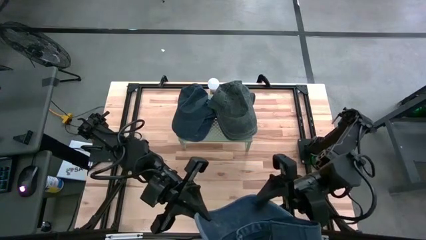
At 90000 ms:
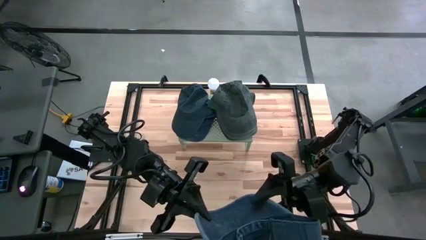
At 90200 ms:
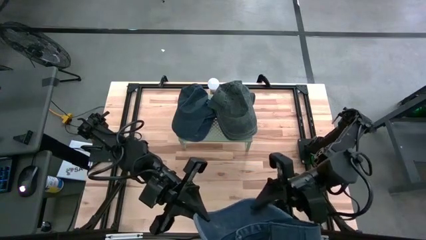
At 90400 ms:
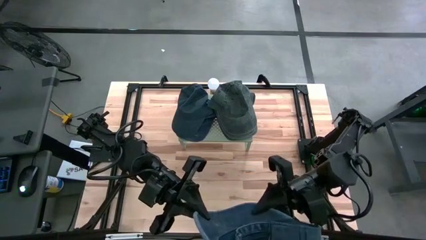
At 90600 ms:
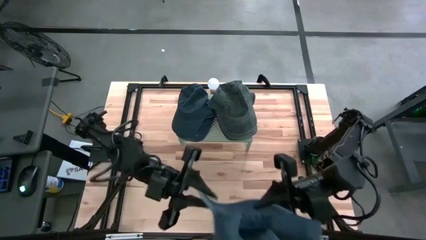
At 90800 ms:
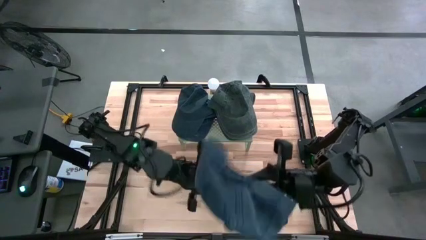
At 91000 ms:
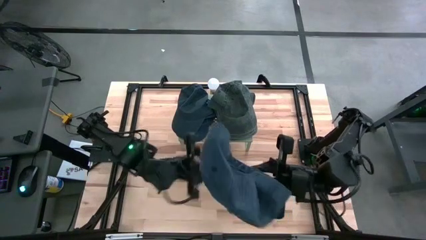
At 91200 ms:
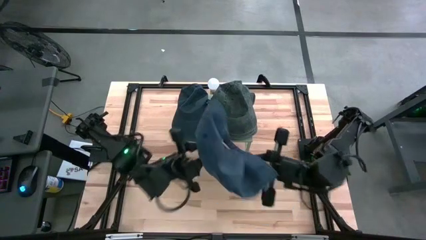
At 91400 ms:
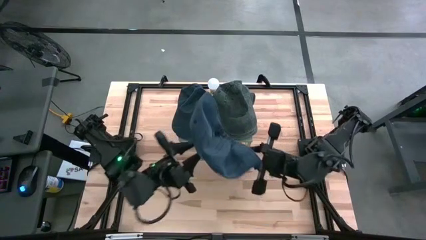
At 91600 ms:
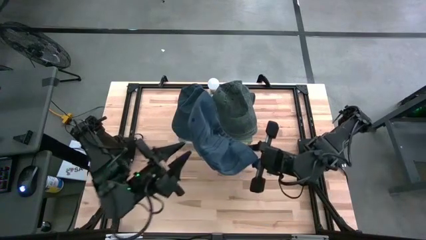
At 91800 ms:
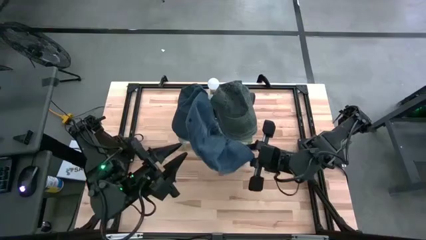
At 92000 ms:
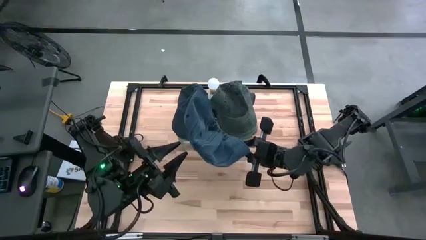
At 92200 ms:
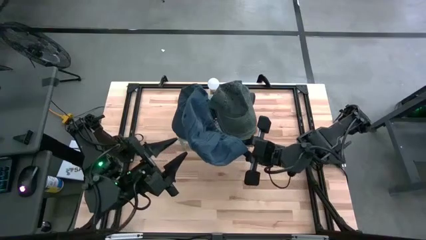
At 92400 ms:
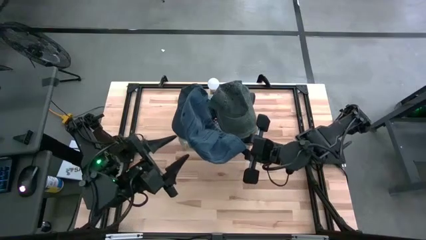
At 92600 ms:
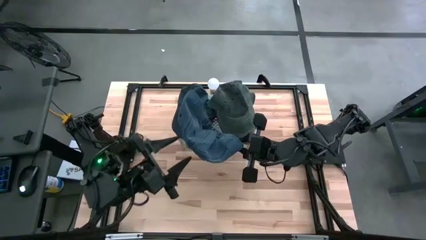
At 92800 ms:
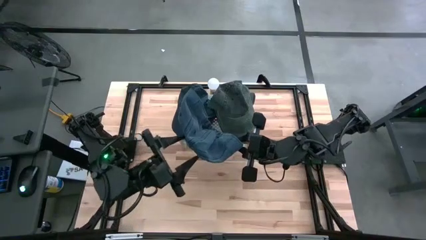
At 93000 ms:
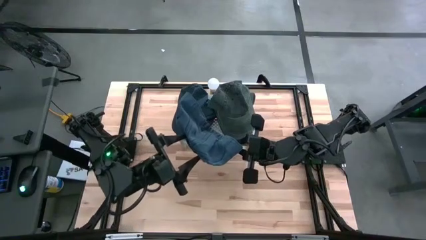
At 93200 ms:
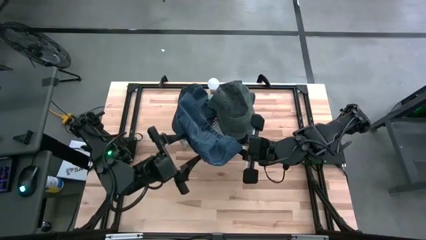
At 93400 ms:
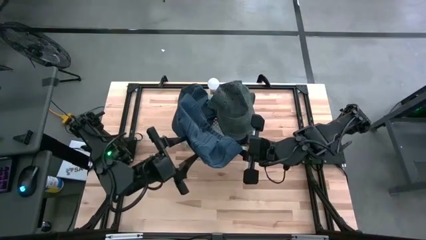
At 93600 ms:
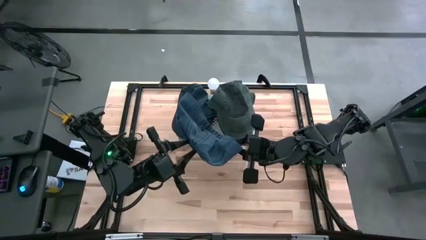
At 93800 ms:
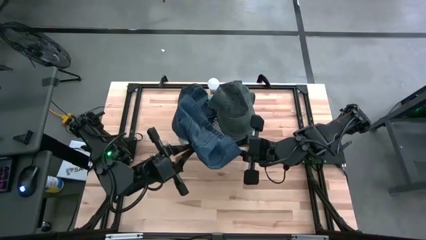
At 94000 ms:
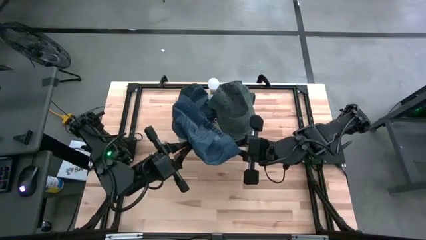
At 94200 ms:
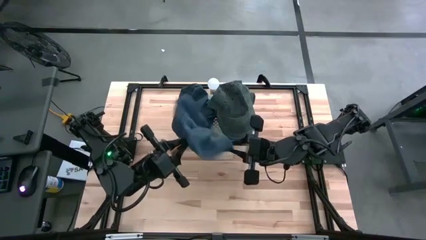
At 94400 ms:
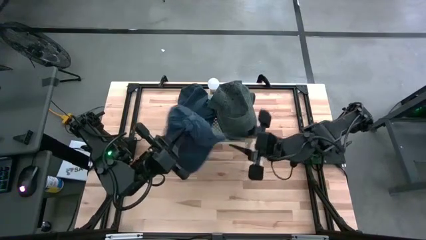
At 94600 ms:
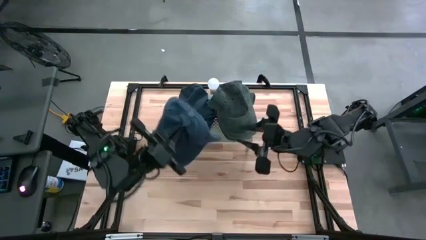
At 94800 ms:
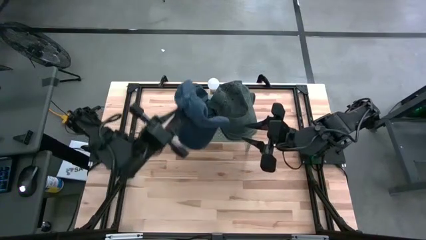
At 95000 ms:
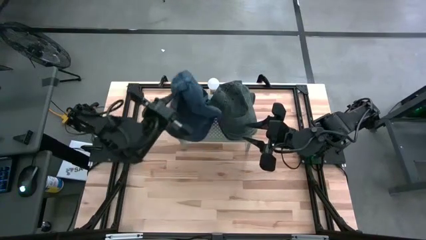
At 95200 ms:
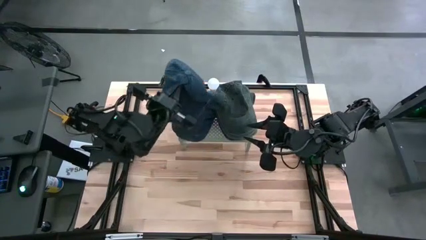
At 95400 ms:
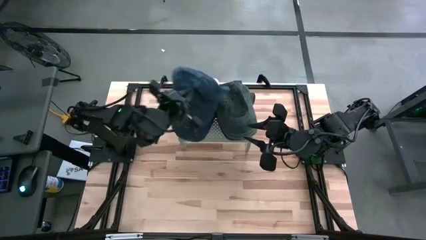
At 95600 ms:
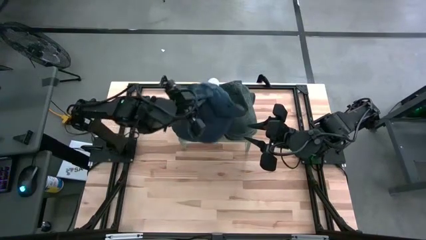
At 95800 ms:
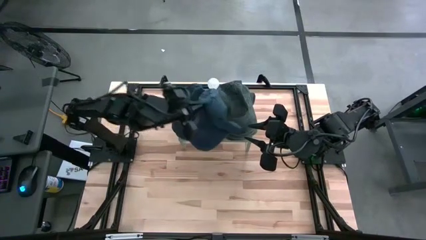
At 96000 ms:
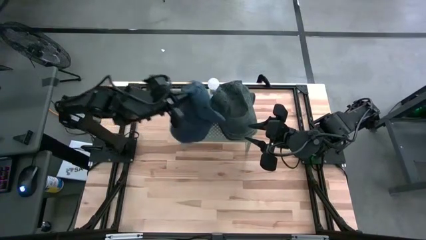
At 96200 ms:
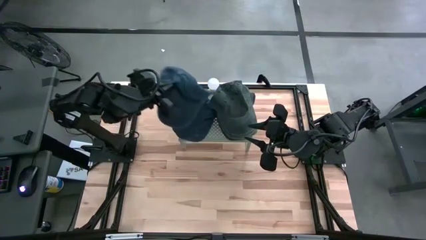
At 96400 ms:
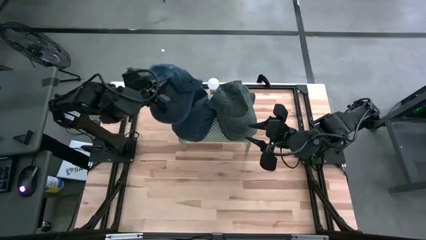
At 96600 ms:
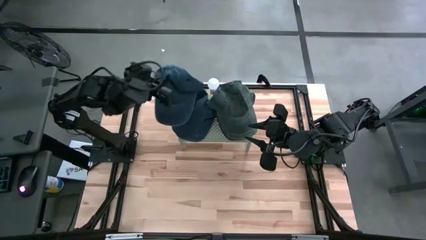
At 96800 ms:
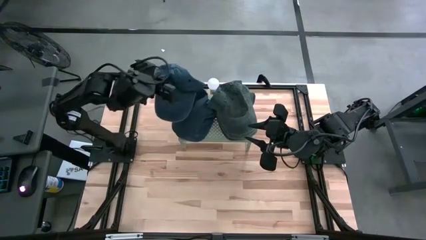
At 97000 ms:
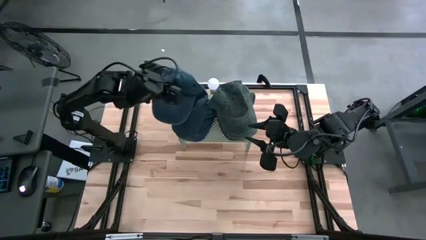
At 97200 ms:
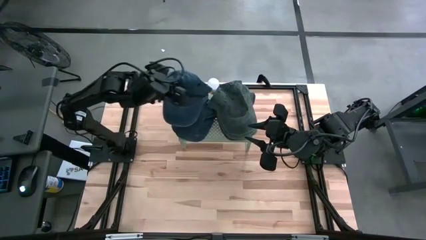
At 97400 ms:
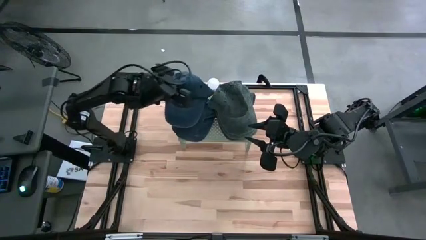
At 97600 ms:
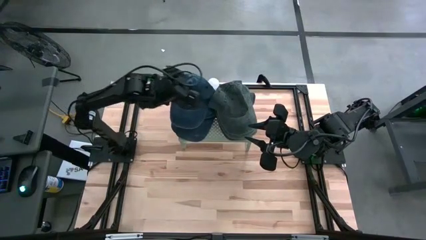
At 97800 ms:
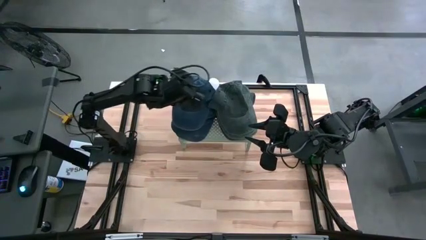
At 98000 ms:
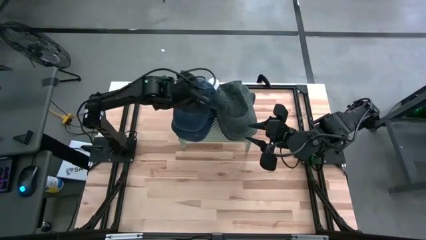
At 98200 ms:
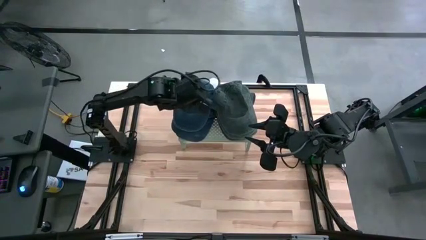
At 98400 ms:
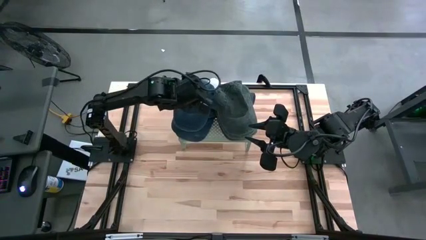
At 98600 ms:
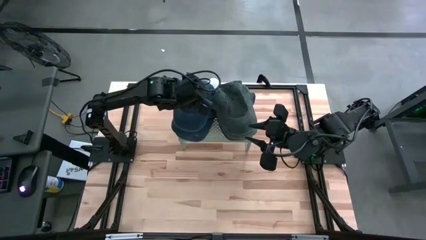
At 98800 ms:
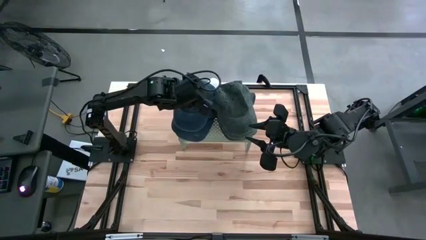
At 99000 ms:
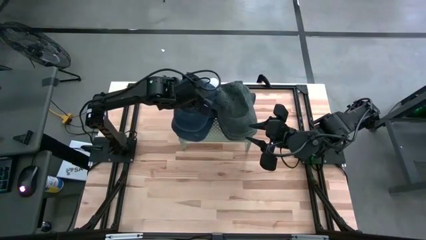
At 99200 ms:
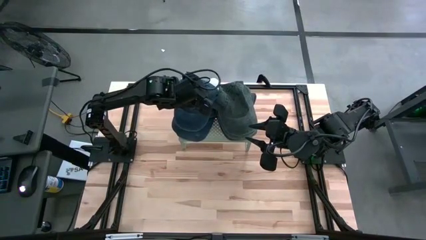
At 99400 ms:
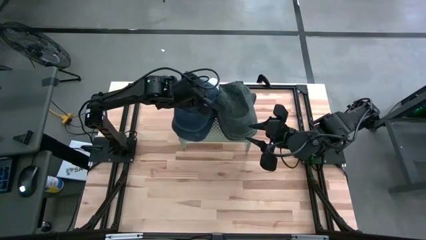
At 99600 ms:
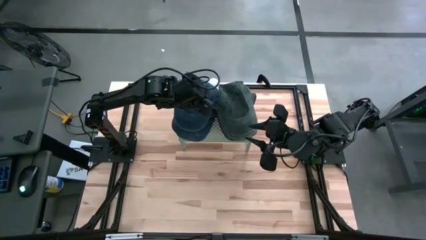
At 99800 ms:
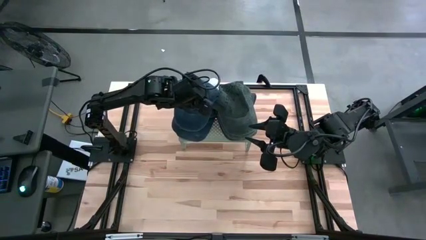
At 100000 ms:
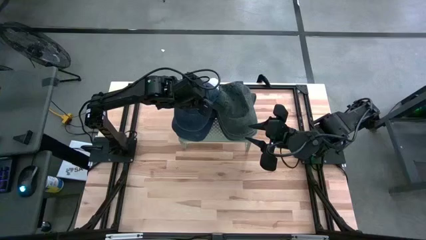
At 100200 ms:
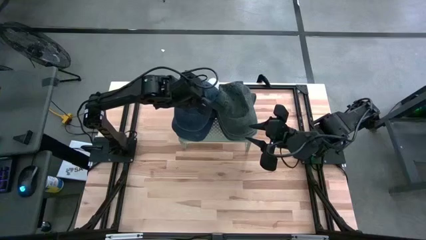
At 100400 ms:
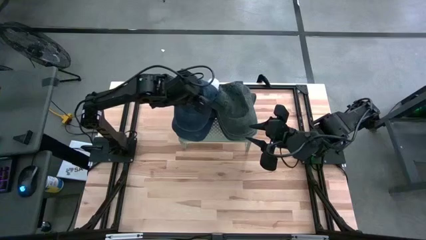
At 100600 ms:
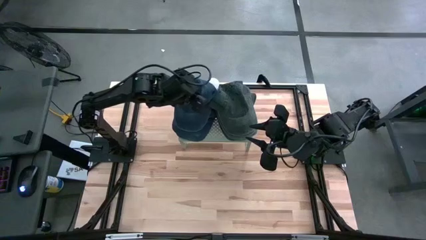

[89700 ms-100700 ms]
Task: Pick & Place hat
Stack the dark blue cap on the top of the dark blue cap on the shelf

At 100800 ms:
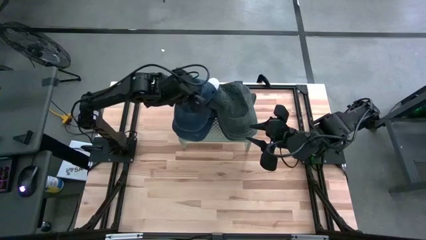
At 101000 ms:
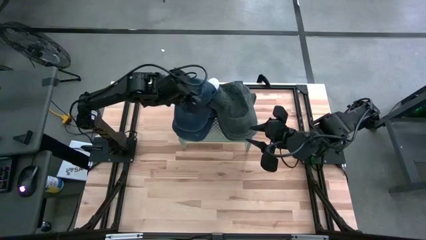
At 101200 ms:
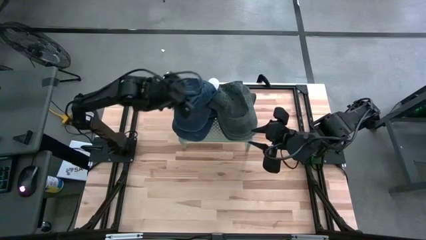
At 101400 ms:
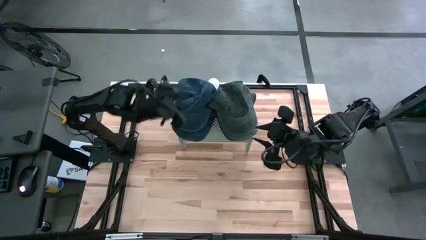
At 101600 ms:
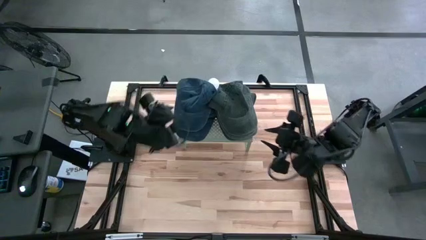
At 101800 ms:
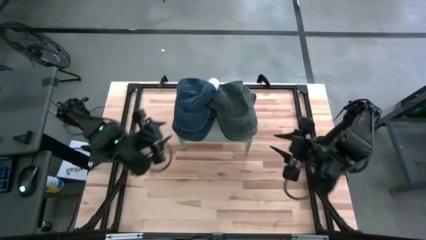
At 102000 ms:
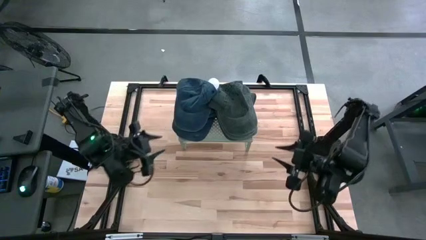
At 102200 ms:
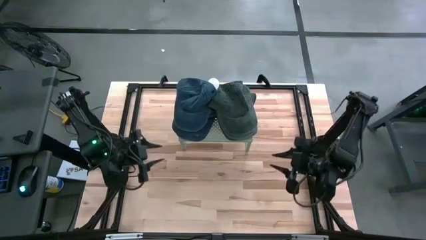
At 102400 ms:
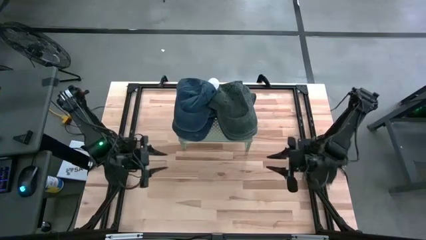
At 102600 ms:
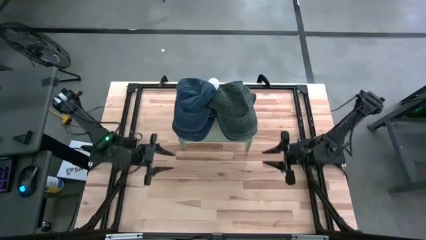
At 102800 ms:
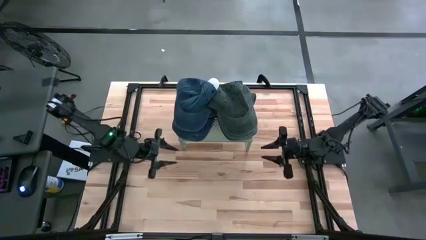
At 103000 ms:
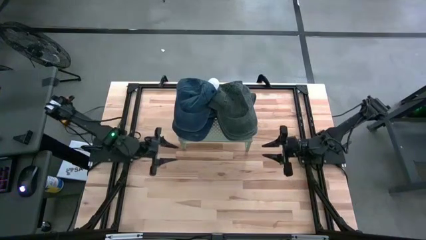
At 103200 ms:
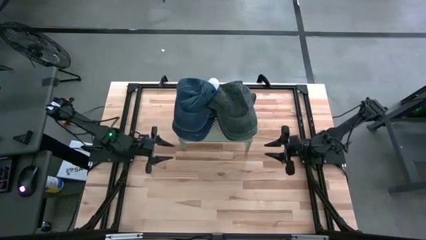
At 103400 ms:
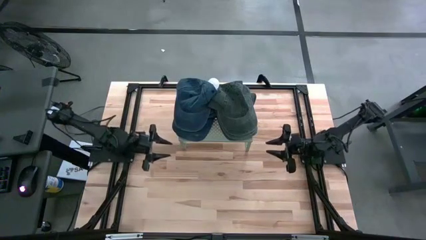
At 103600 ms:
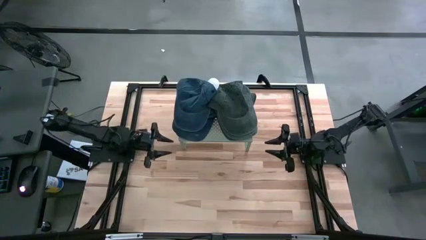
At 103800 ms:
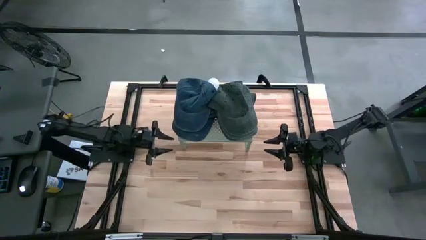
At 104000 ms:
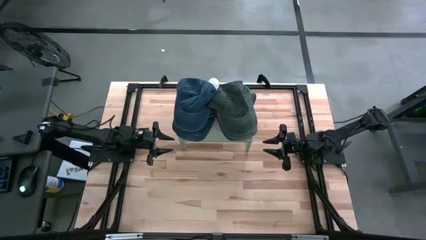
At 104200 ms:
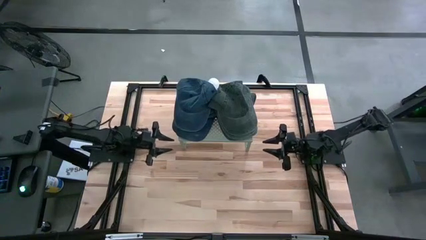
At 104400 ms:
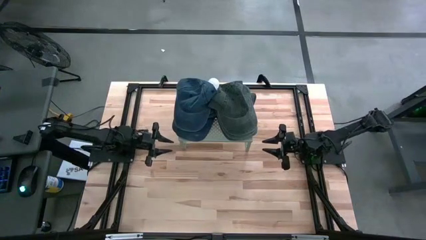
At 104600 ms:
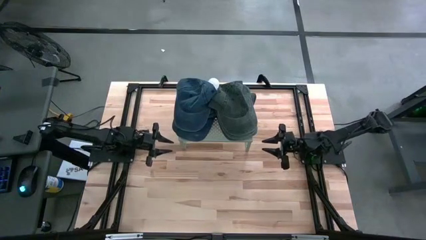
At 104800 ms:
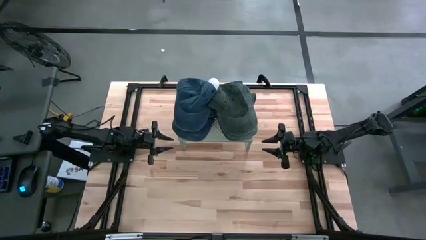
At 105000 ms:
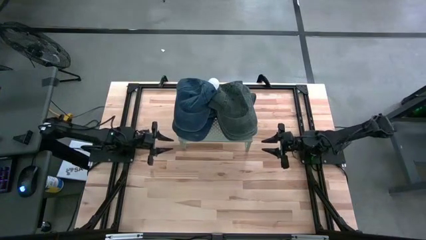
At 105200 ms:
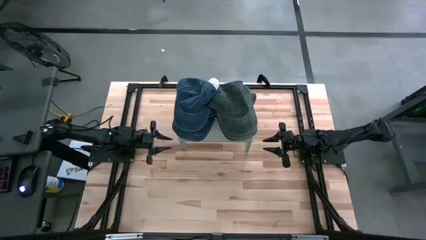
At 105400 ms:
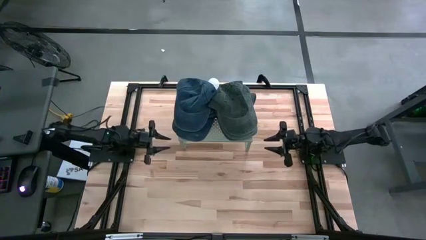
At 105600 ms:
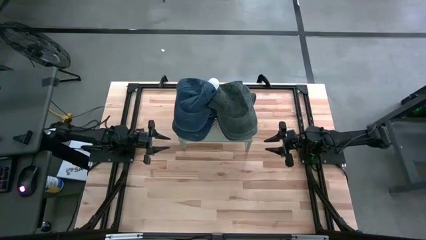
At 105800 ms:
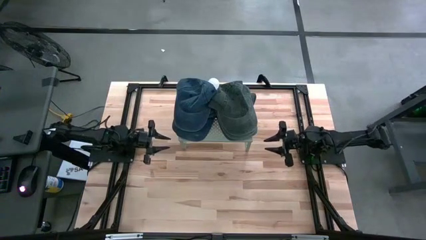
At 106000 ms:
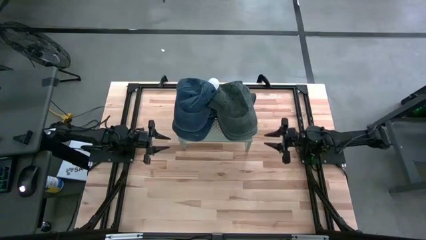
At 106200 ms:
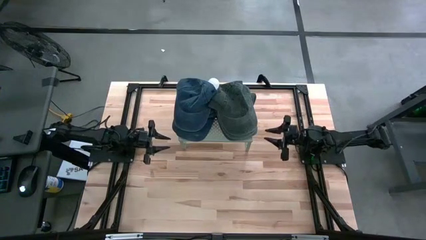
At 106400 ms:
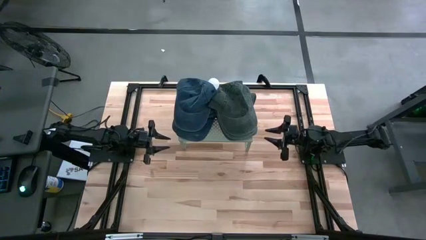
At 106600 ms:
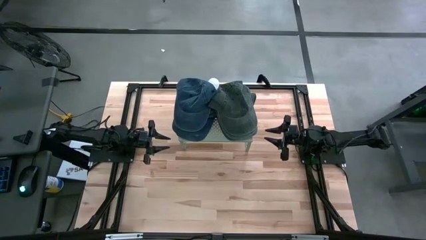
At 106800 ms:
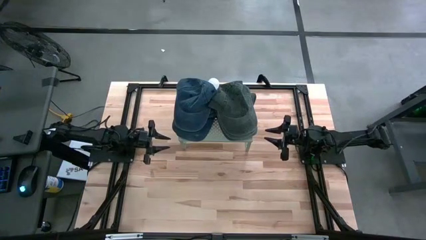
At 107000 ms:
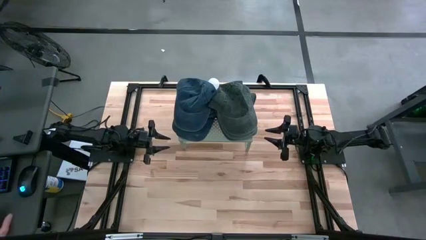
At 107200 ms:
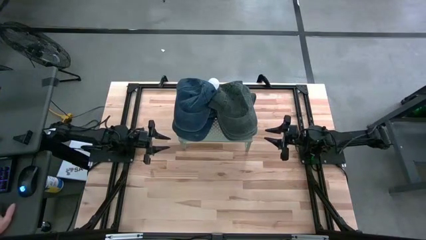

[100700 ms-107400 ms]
Return to Home Position
